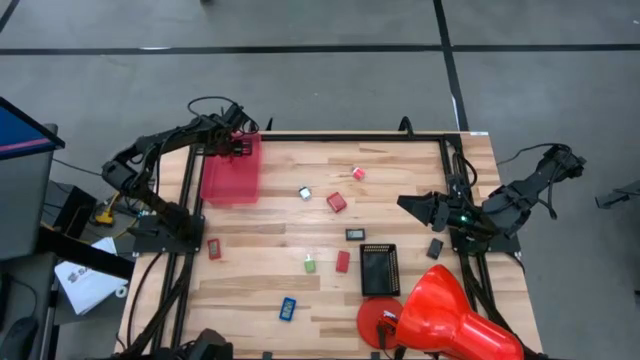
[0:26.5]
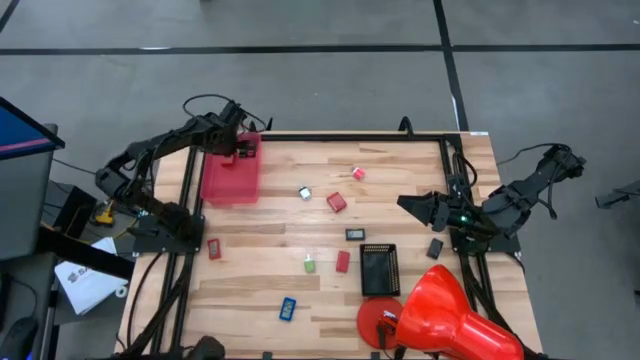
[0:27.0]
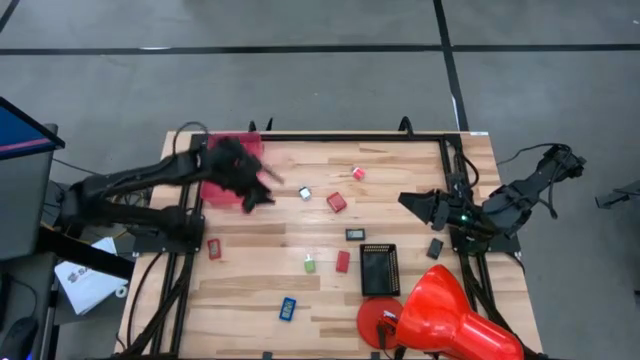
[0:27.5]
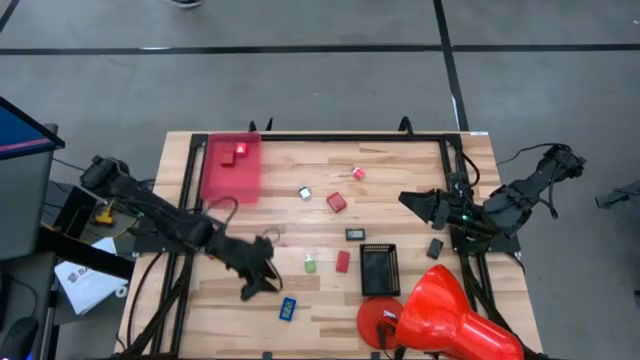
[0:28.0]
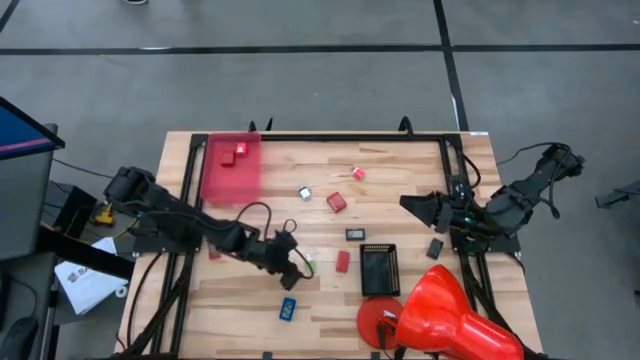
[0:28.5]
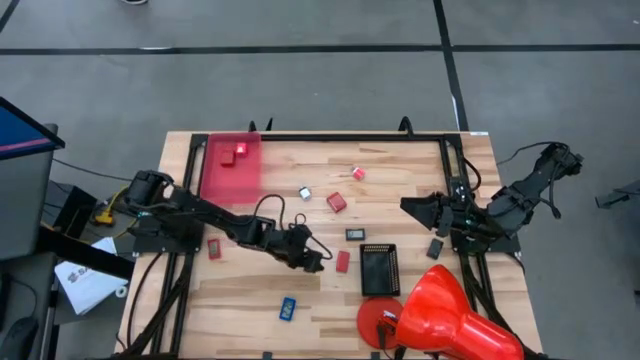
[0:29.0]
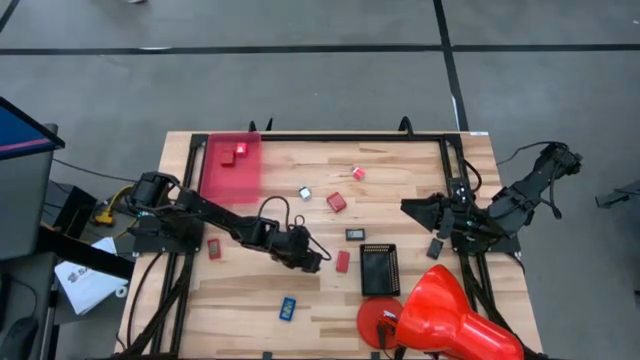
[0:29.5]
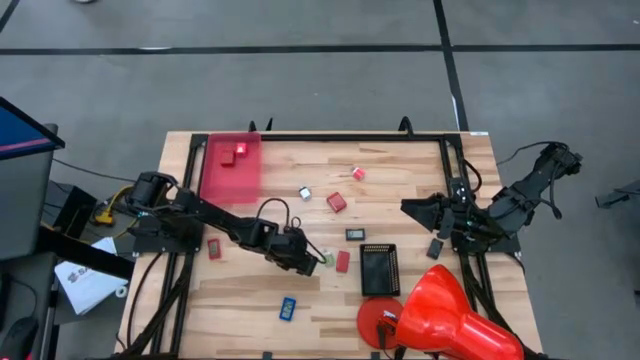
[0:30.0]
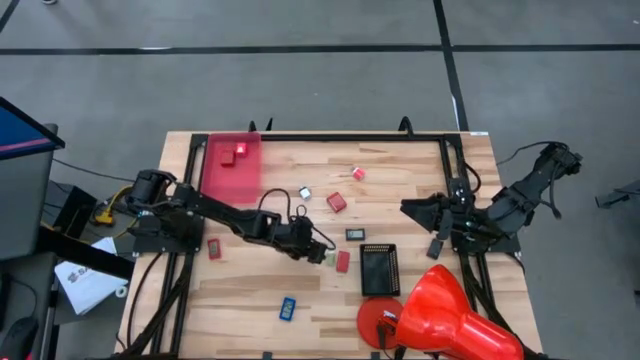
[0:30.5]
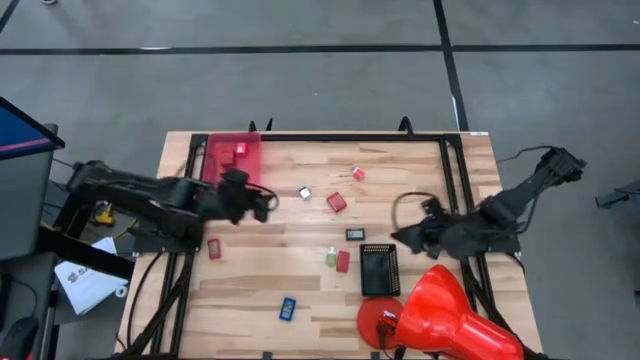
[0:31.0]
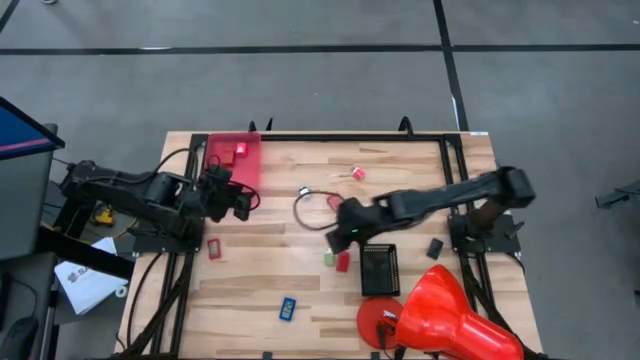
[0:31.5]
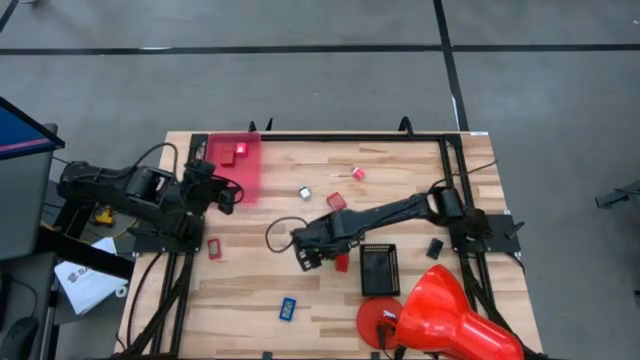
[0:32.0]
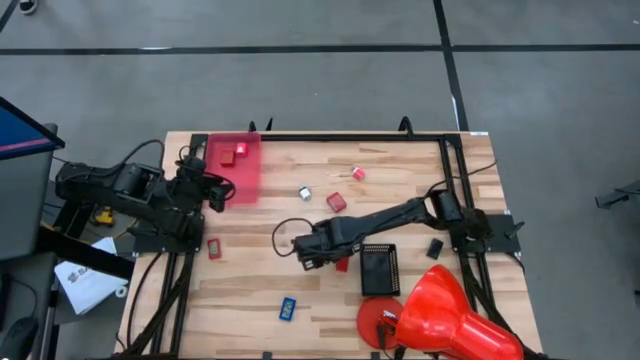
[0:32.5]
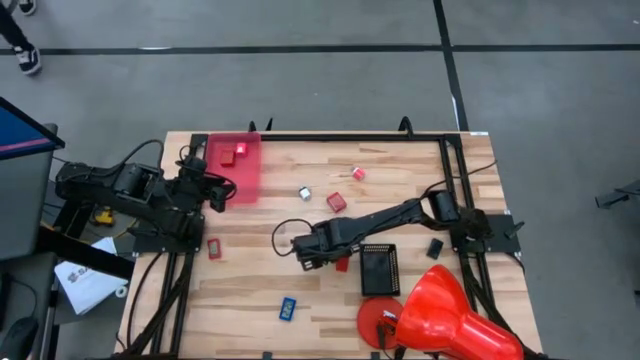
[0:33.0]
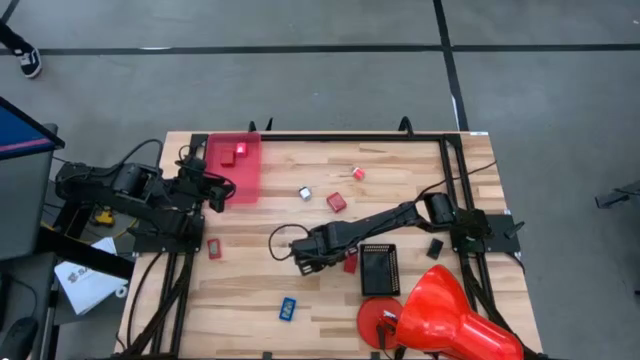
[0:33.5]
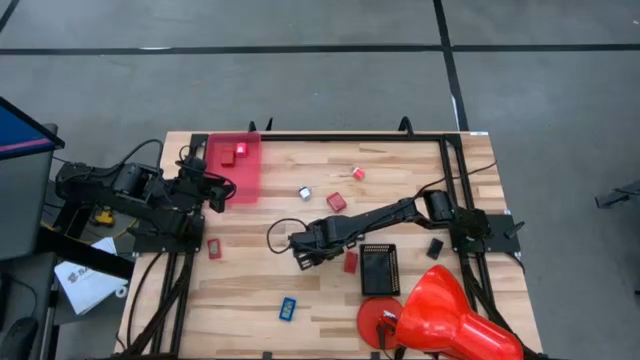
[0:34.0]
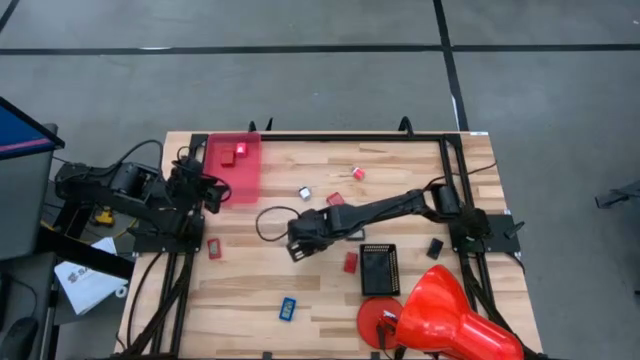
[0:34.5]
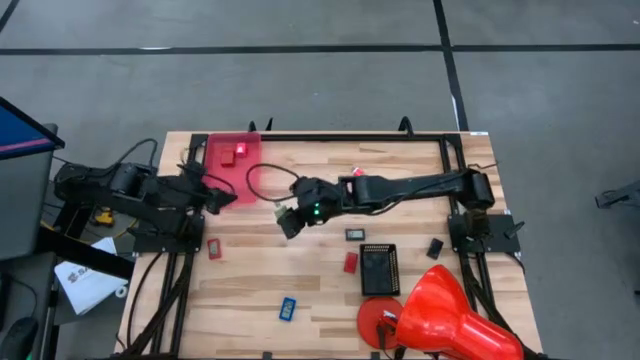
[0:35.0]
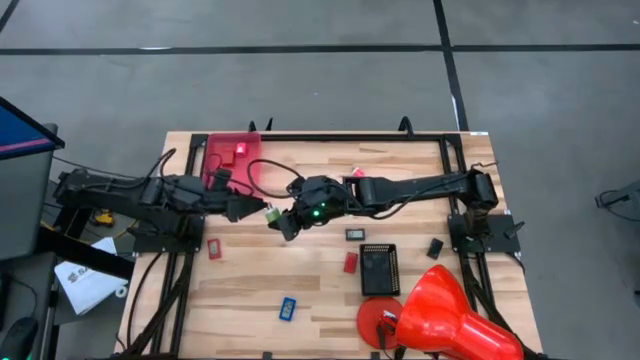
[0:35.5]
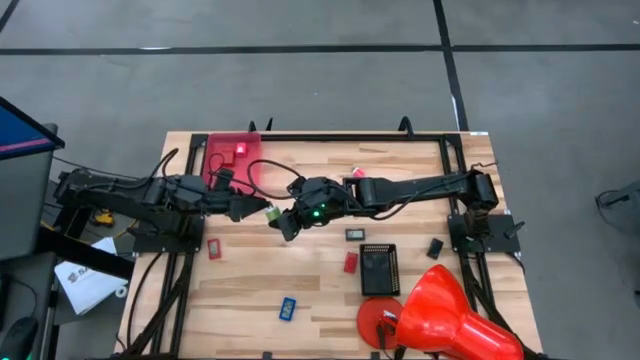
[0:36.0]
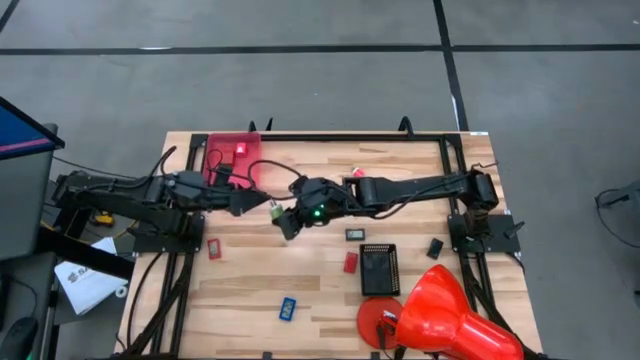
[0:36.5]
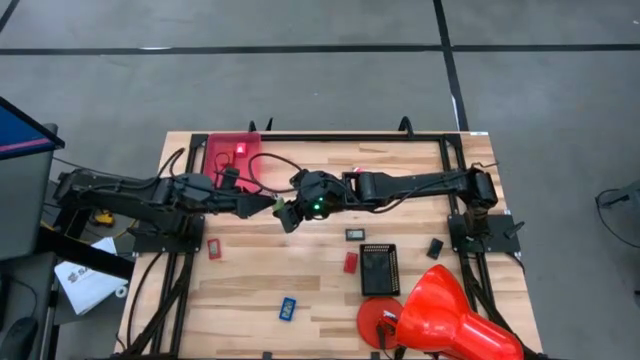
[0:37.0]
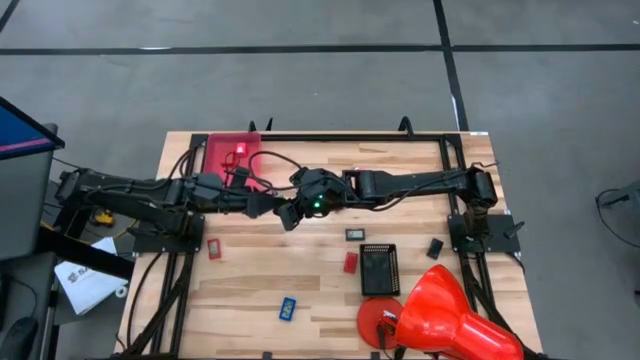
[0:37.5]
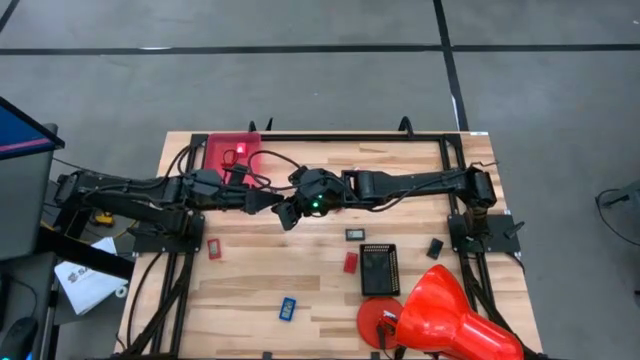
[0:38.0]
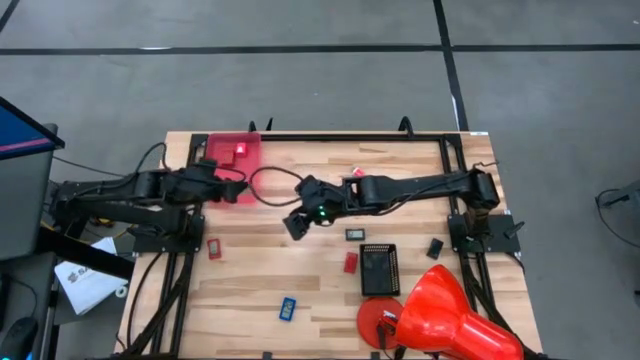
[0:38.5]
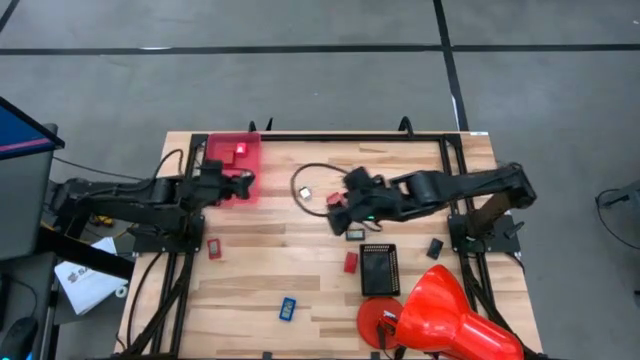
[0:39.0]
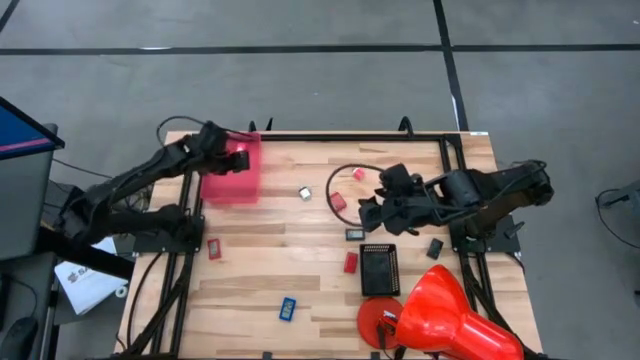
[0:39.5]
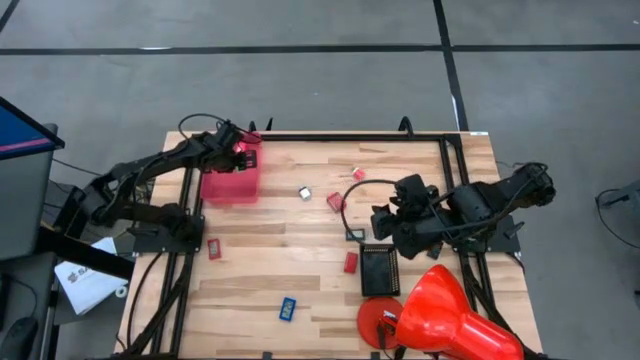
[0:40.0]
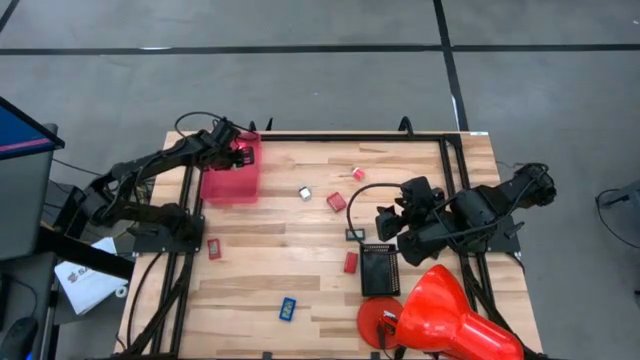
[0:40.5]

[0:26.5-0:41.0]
Task: Pick & Place Office items
Put the green charger adapter into the pink bin

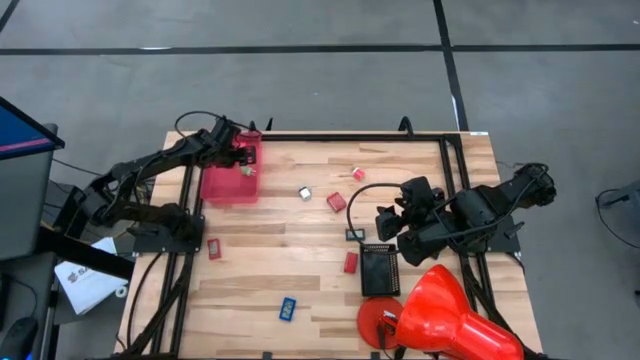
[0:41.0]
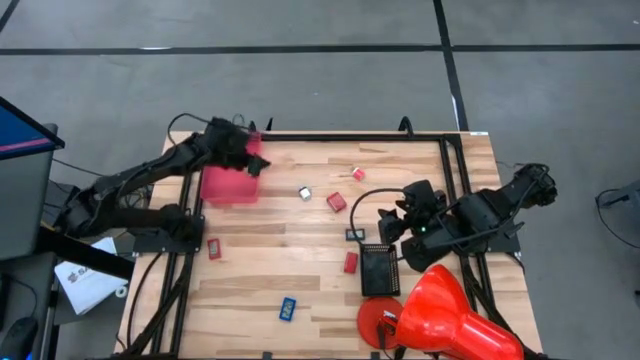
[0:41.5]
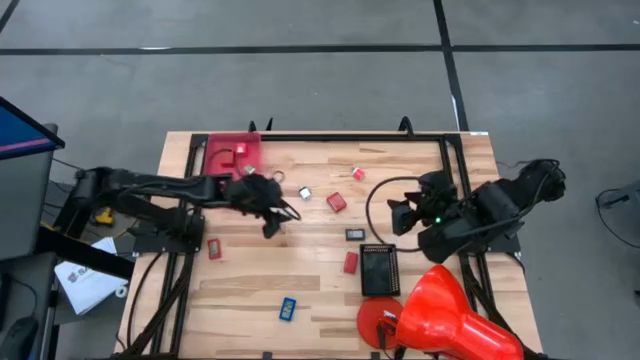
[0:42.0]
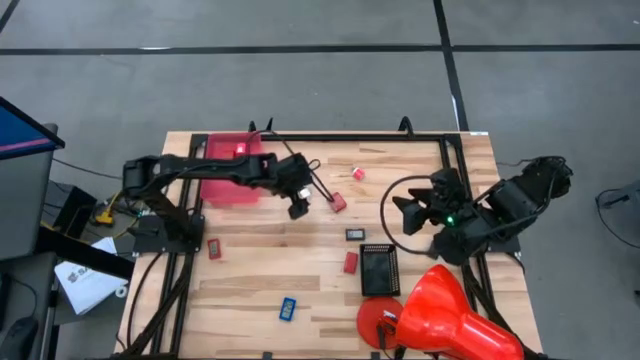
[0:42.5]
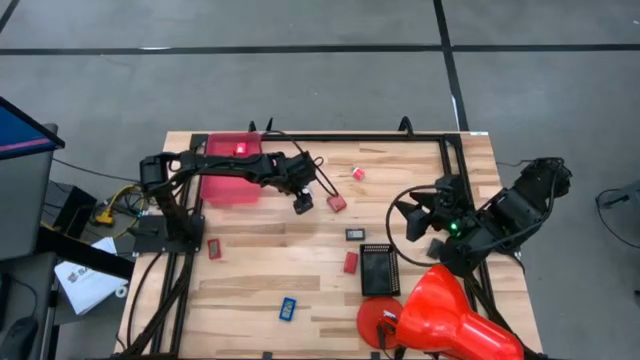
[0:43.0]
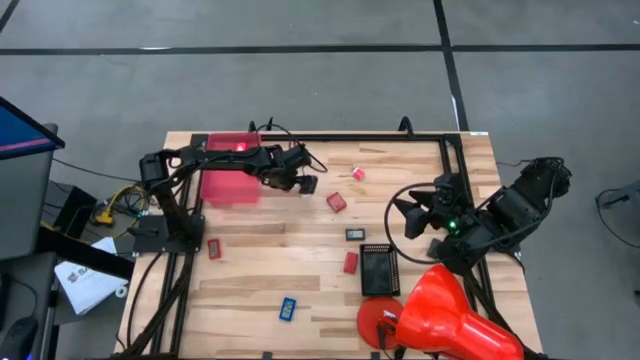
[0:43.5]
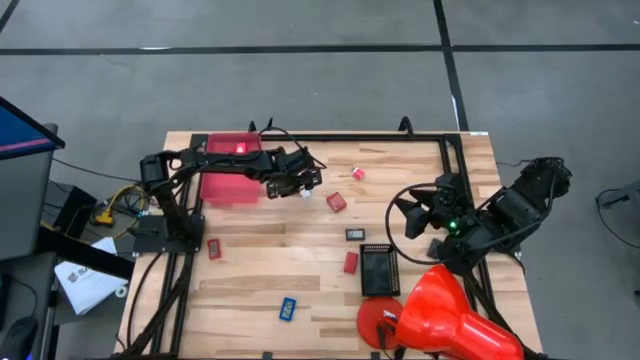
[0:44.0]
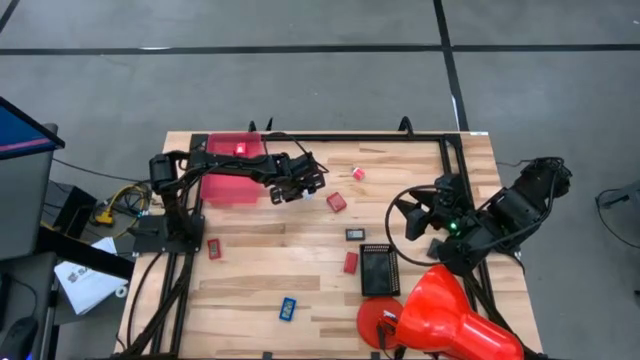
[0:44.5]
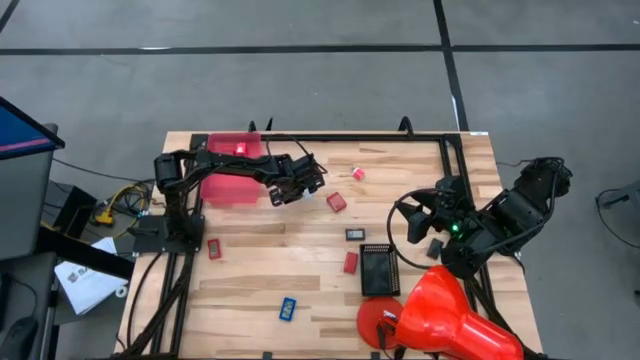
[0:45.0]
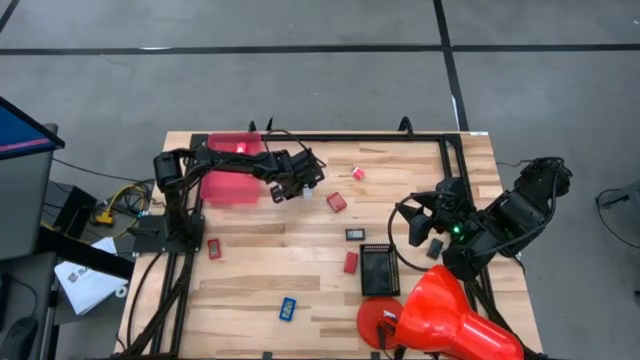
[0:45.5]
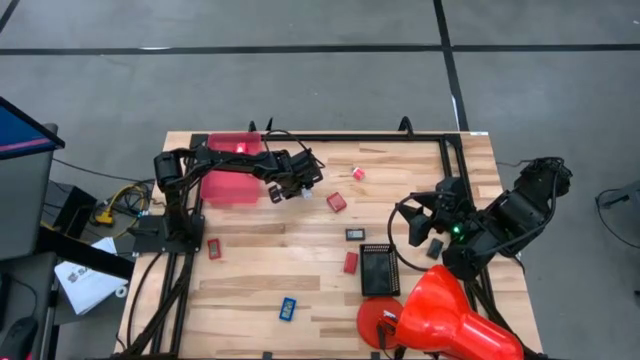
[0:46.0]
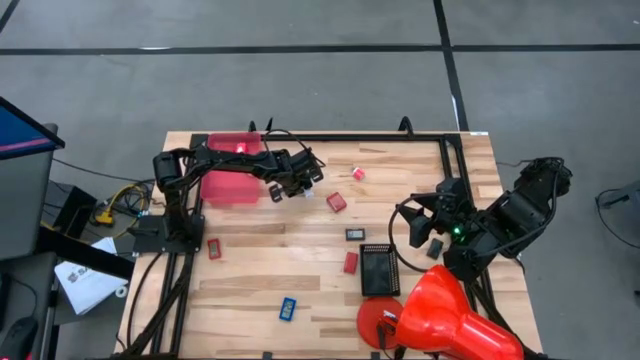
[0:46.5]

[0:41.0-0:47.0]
Put the white charger adapter into the pink bin

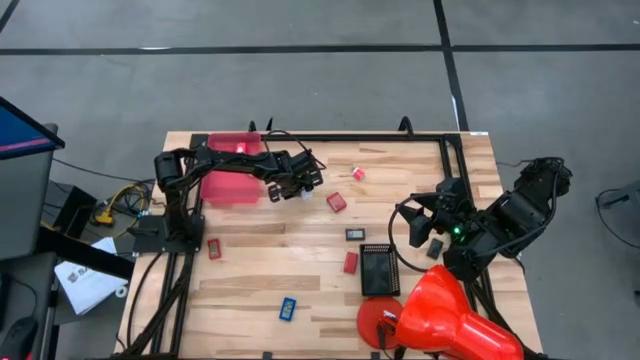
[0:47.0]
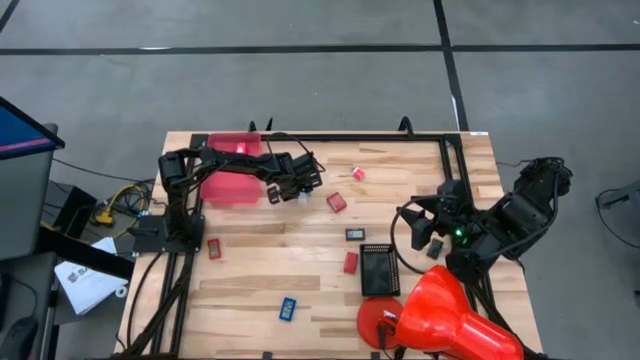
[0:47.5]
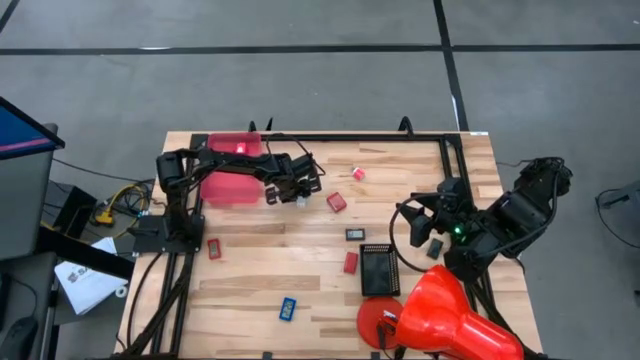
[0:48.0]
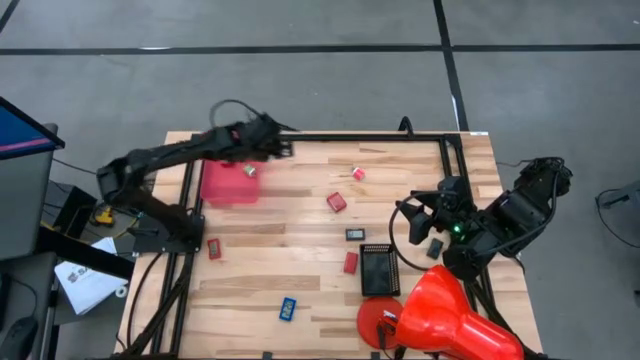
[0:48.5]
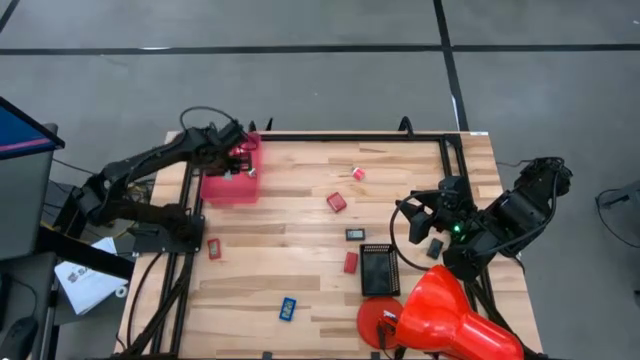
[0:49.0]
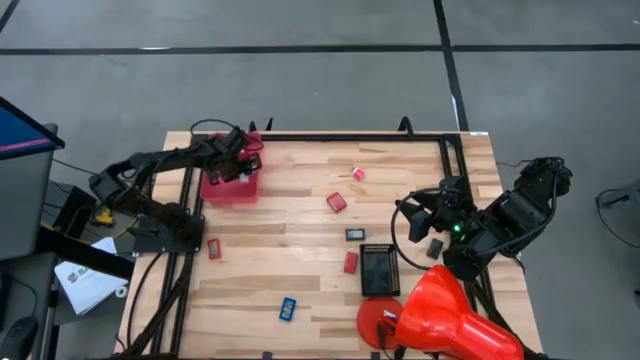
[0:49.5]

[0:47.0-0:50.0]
Put the white charger adapter into the pink bin
